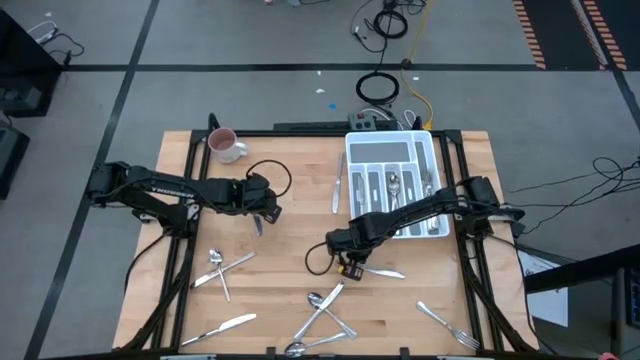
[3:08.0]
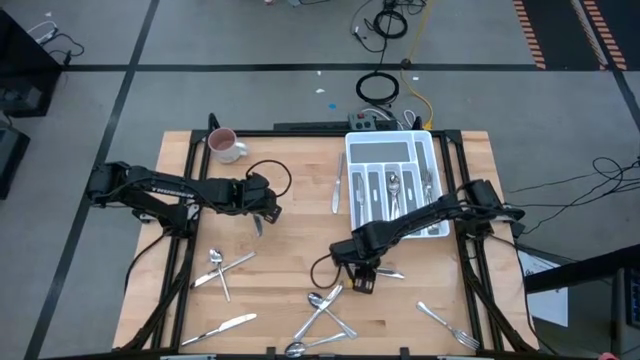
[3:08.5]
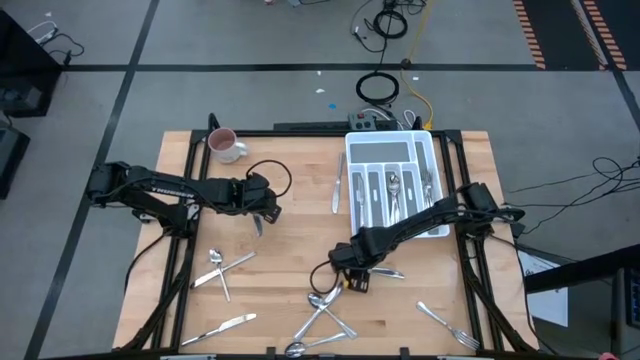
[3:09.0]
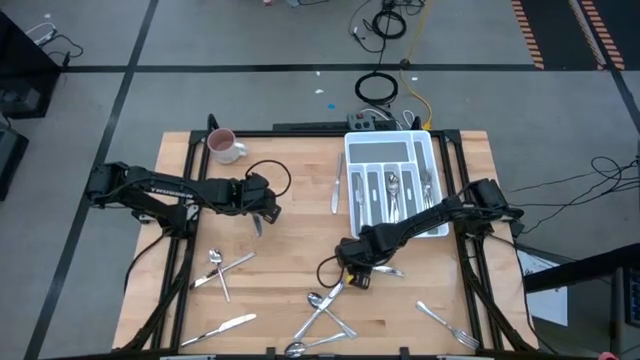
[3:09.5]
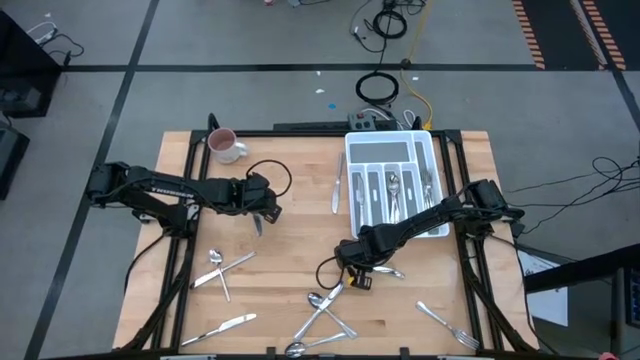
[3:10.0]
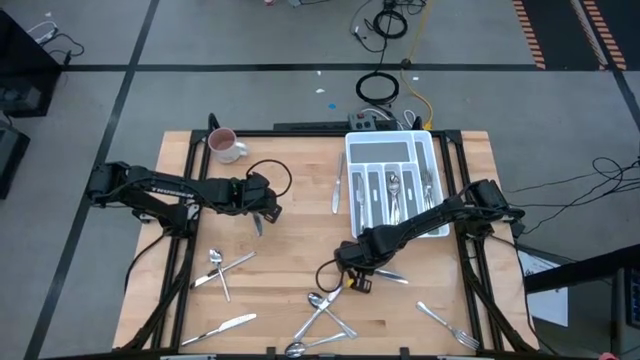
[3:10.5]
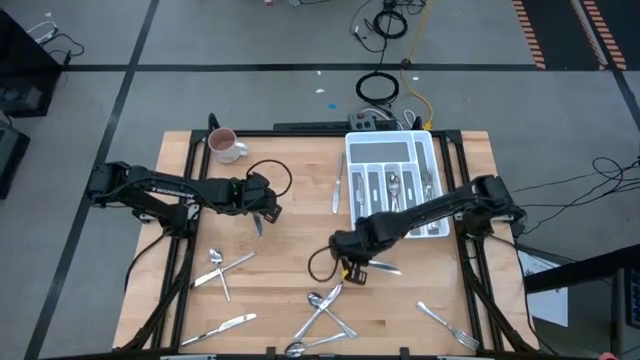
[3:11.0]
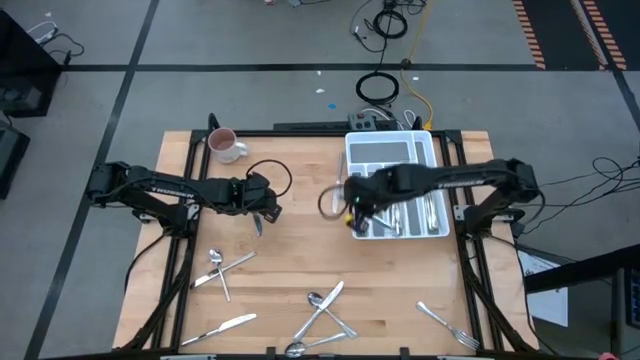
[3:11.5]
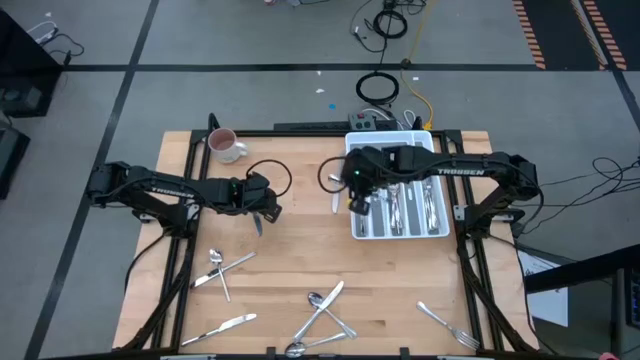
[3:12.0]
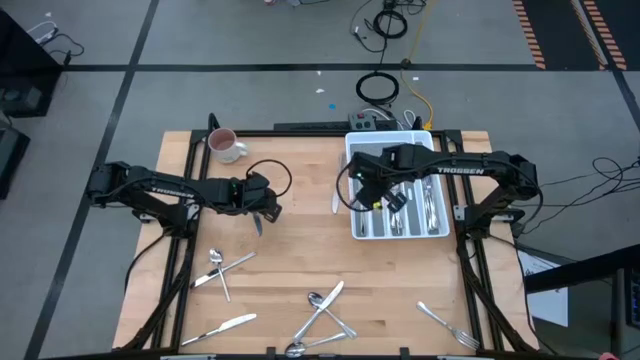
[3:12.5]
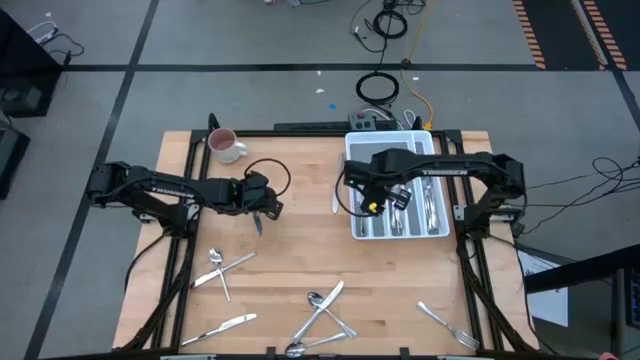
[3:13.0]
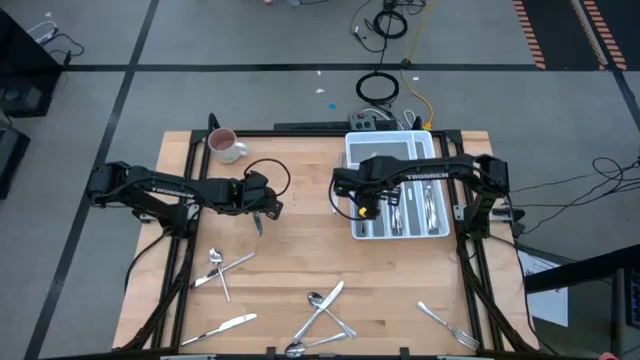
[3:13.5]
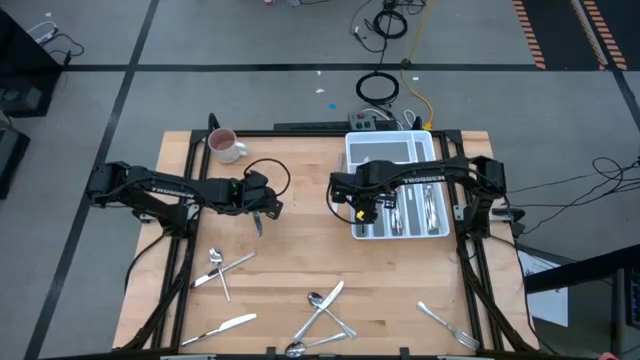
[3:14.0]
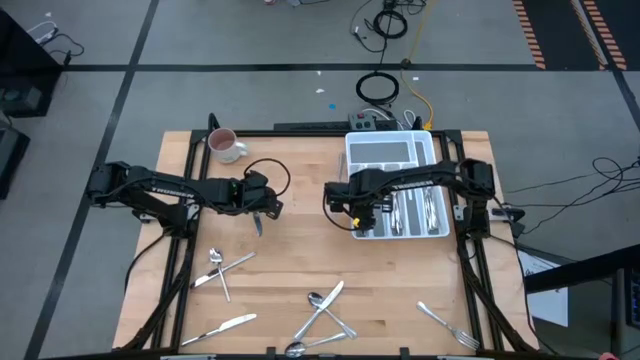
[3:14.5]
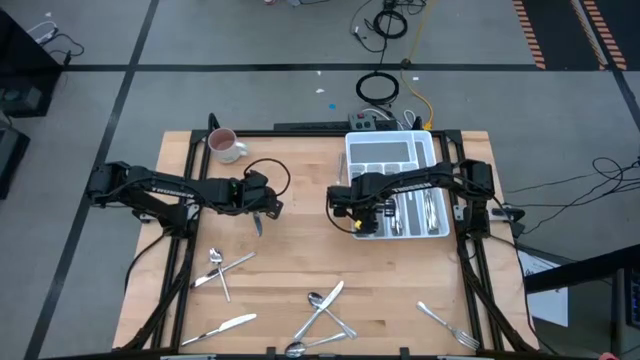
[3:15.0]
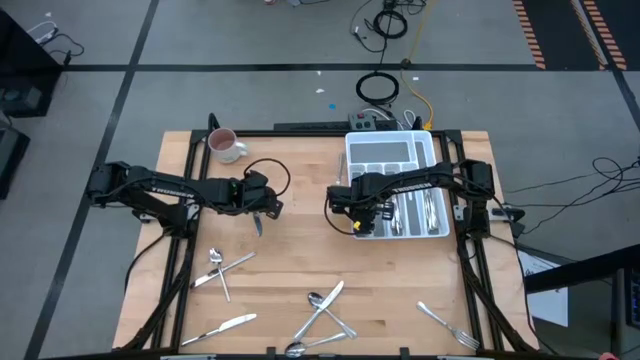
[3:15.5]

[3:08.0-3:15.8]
Task: Sort silverware
Put the knife in the left section of the silverware tray

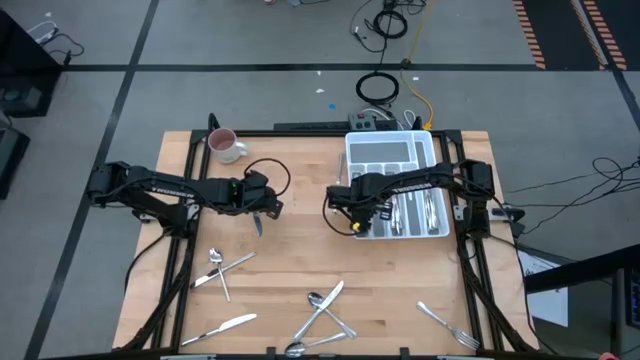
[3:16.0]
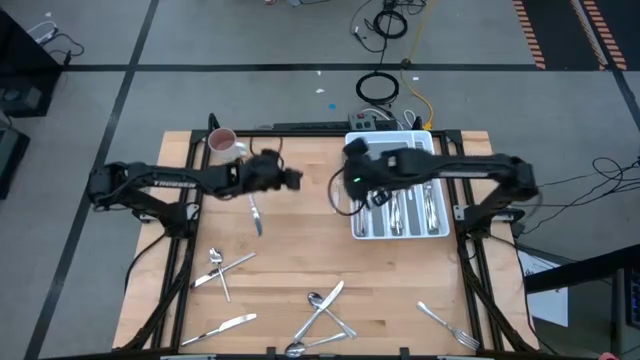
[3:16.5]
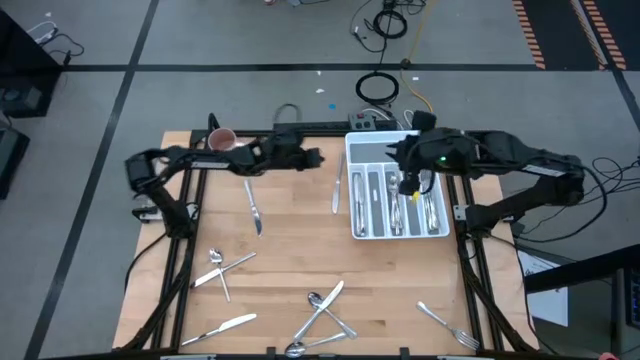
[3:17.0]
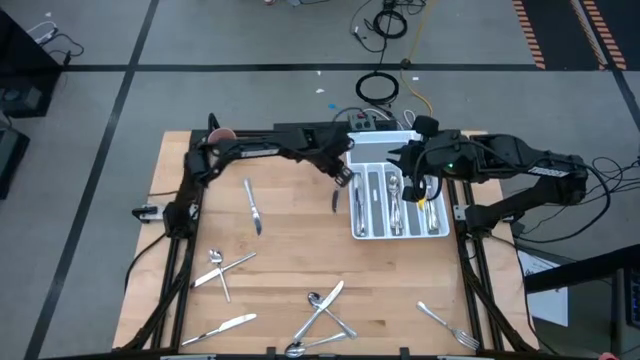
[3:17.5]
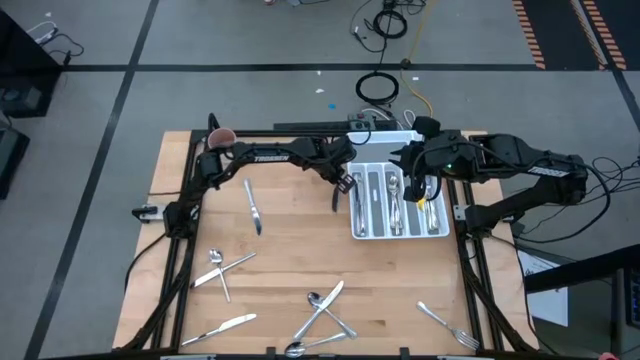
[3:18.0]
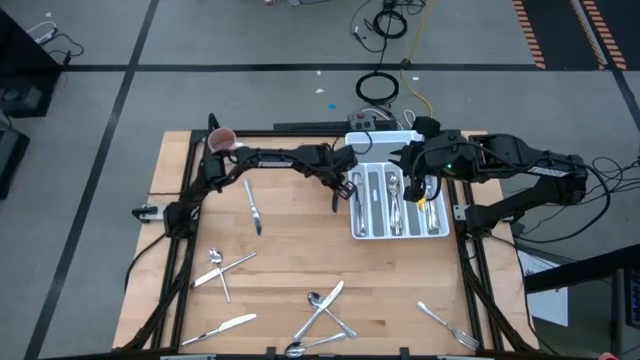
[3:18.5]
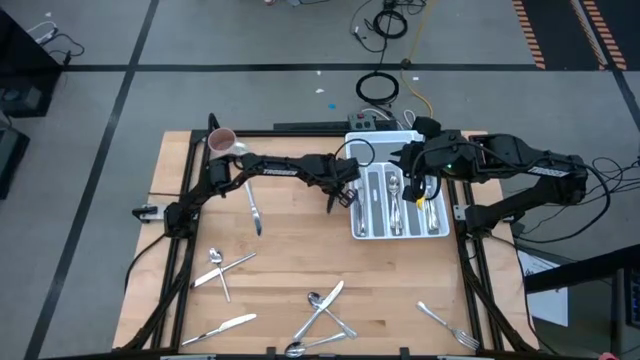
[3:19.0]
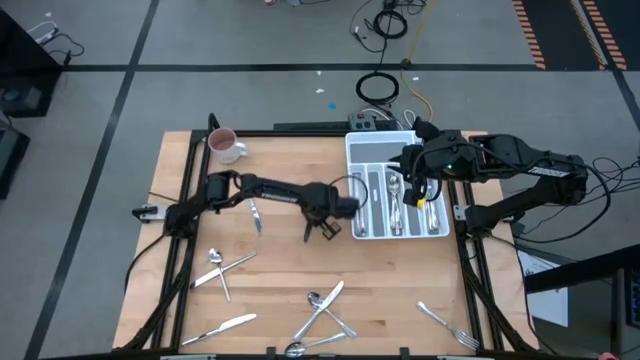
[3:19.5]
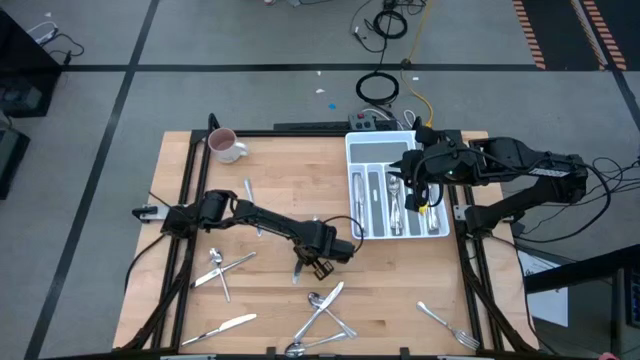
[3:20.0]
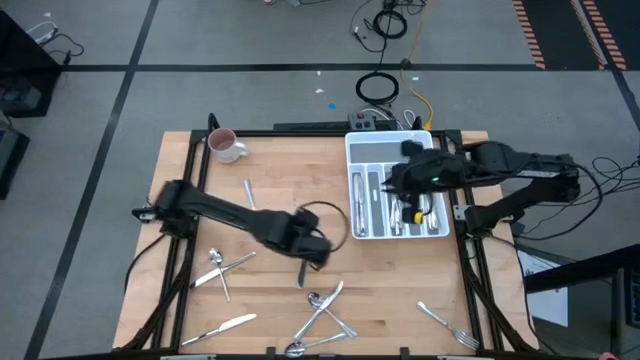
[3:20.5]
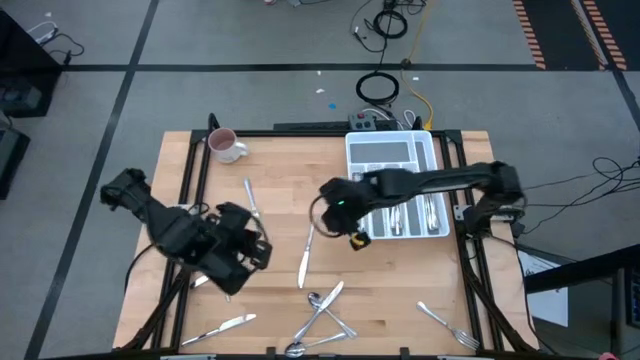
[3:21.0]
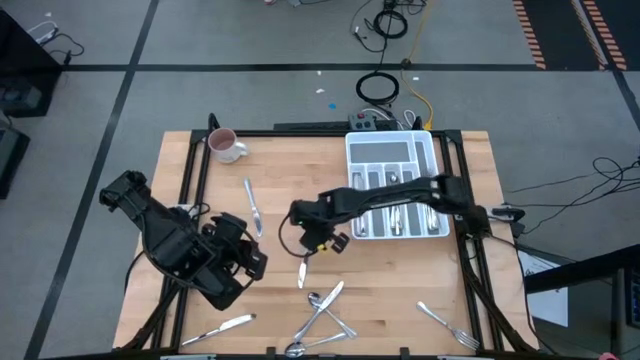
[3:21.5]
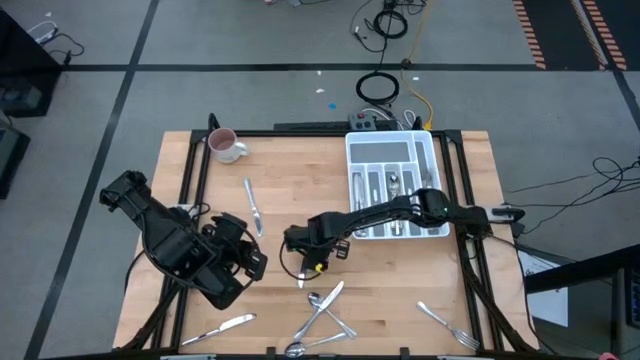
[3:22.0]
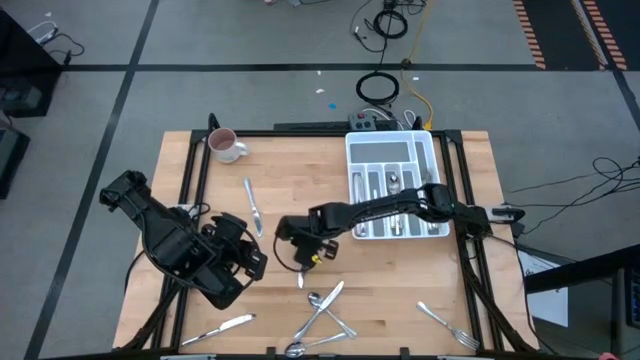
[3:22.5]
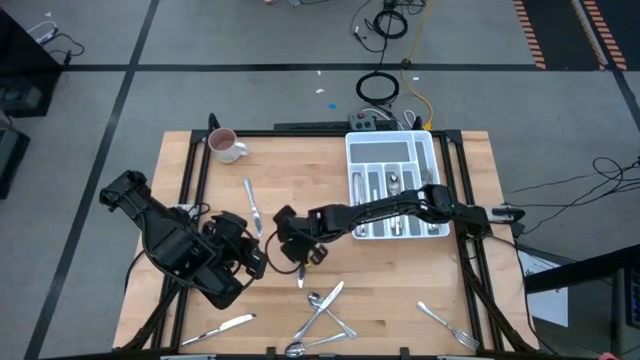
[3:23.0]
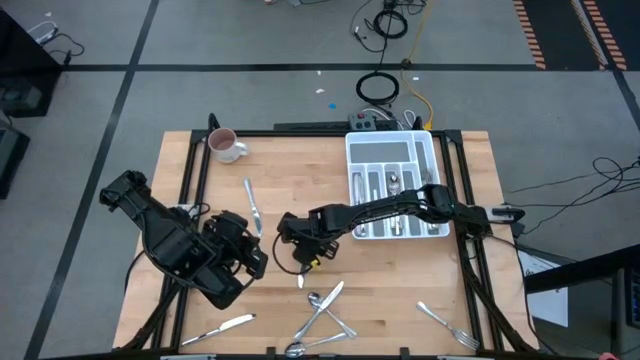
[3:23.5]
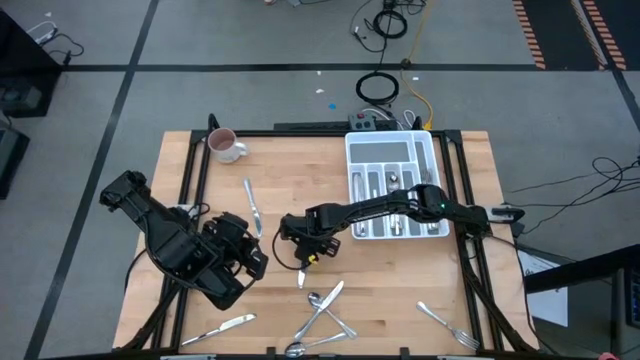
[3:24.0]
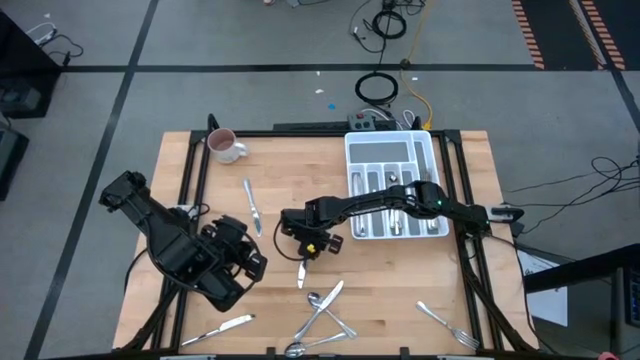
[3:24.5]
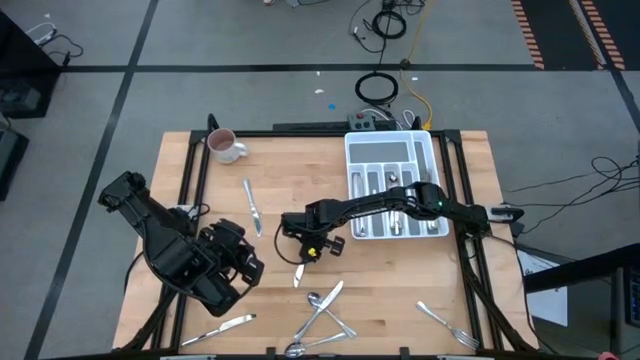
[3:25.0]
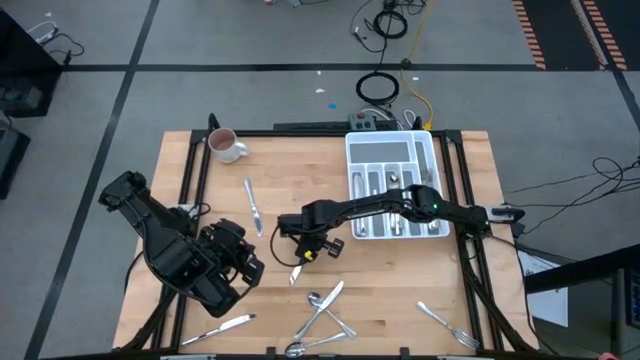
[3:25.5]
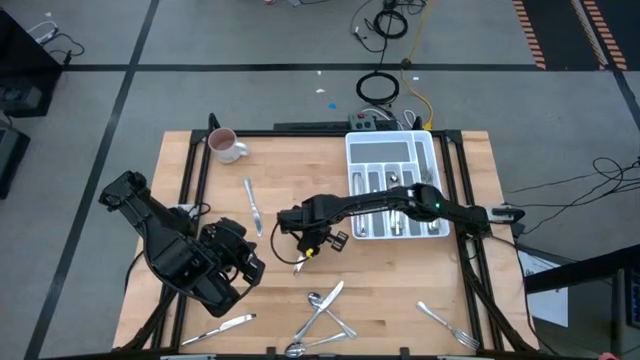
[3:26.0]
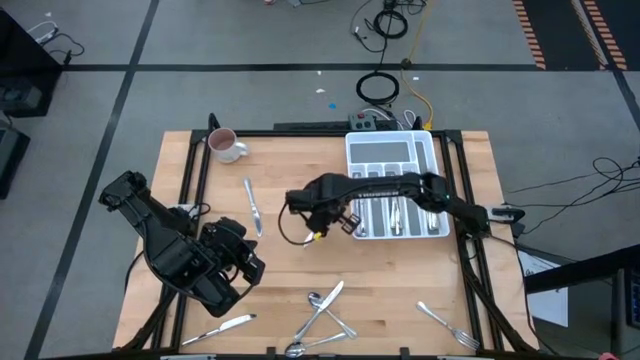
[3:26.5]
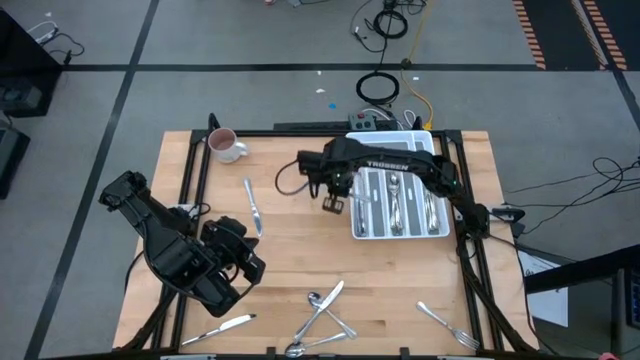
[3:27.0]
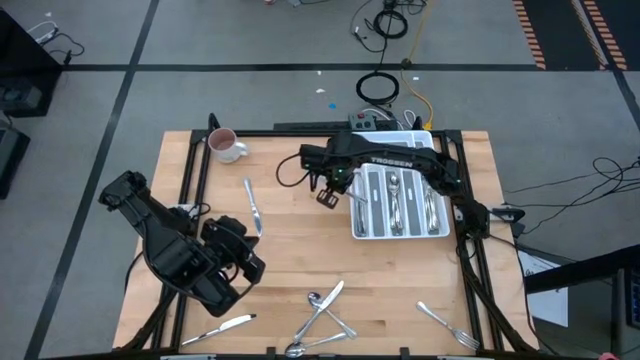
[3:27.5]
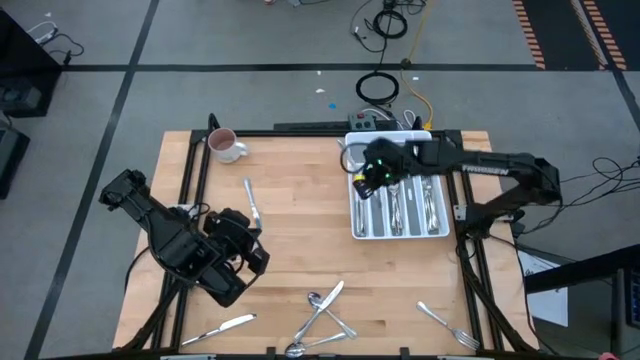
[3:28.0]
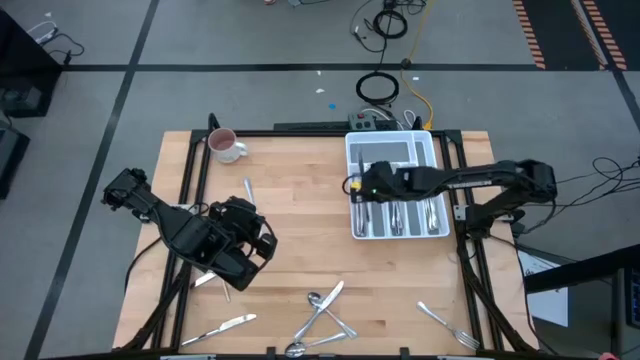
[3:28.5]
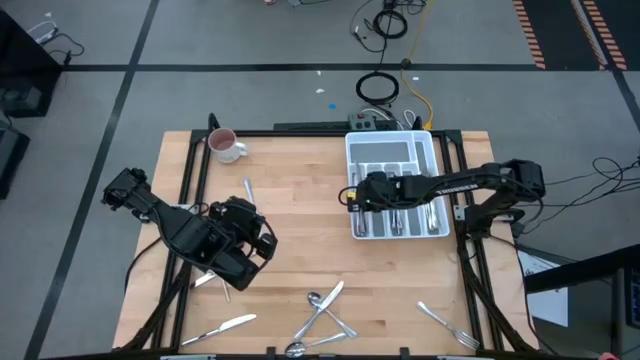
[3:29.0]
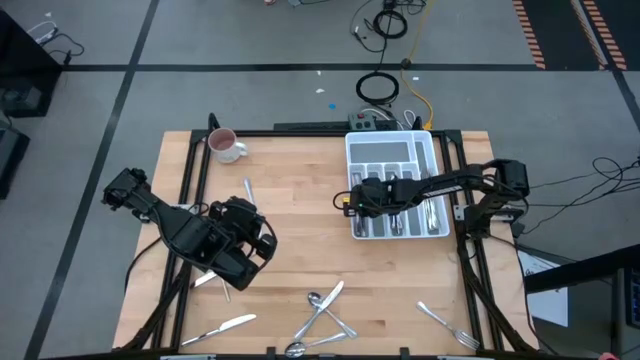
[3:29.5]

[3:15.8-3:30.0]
Put the knife in the left section of the silverware tray
